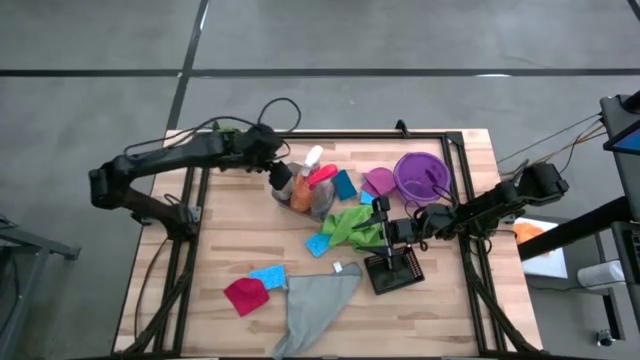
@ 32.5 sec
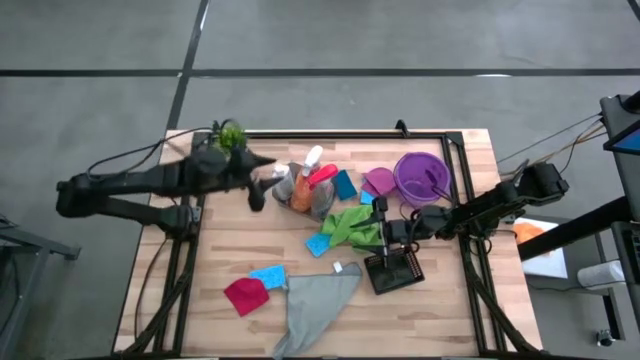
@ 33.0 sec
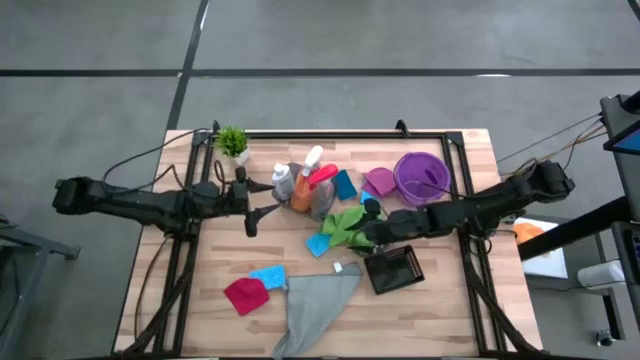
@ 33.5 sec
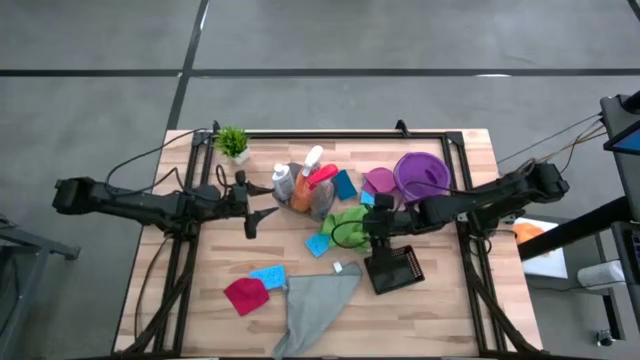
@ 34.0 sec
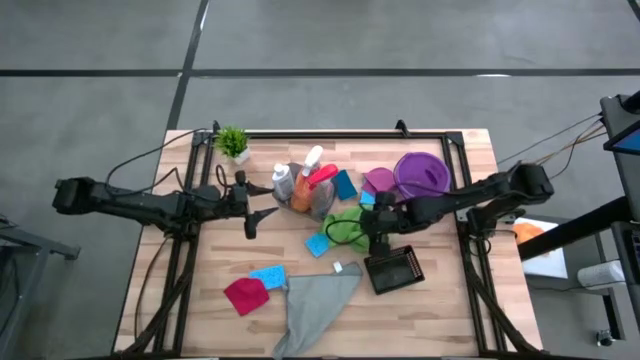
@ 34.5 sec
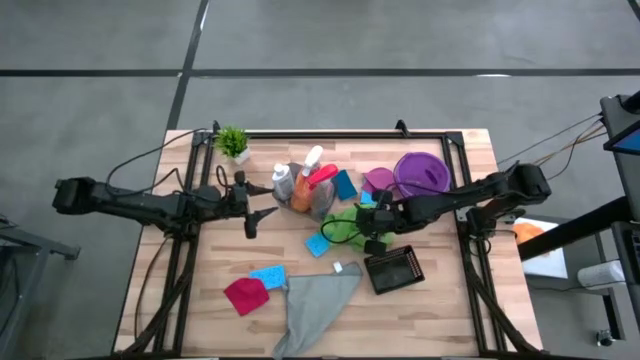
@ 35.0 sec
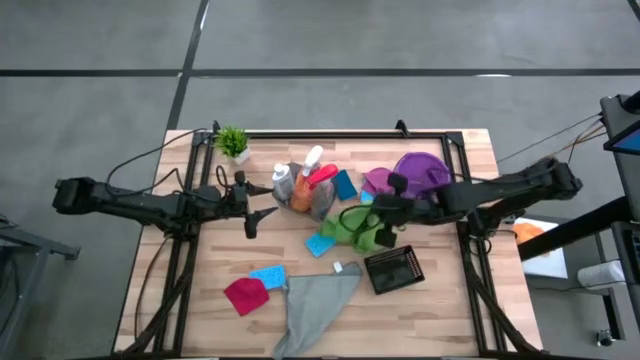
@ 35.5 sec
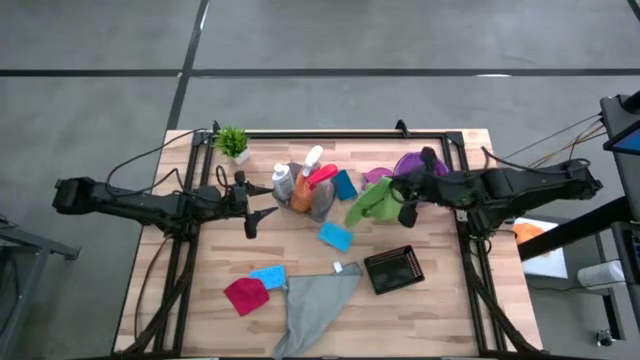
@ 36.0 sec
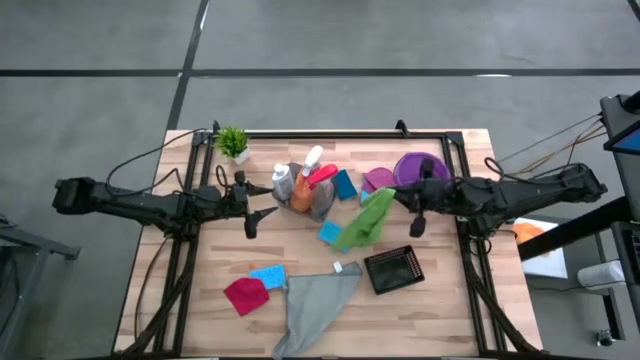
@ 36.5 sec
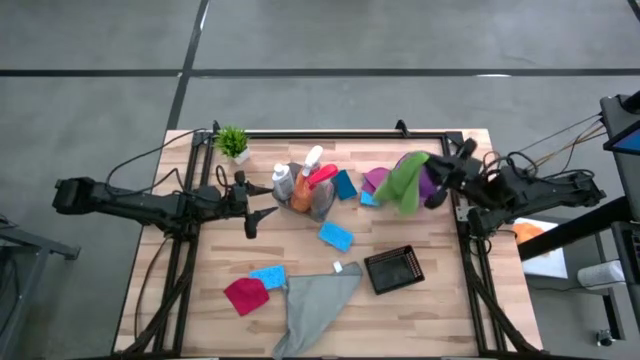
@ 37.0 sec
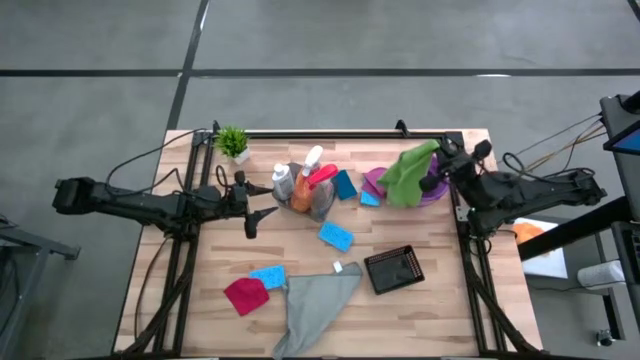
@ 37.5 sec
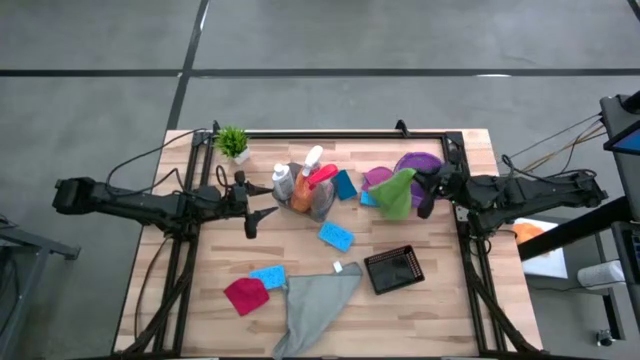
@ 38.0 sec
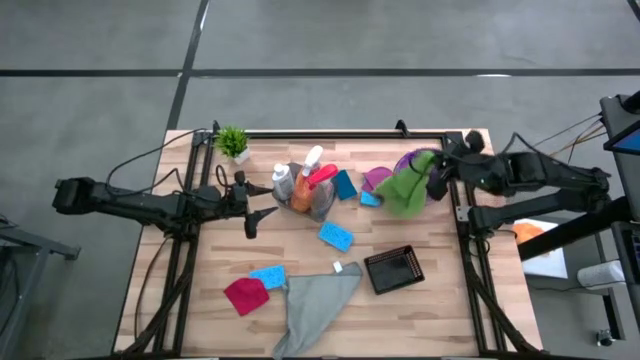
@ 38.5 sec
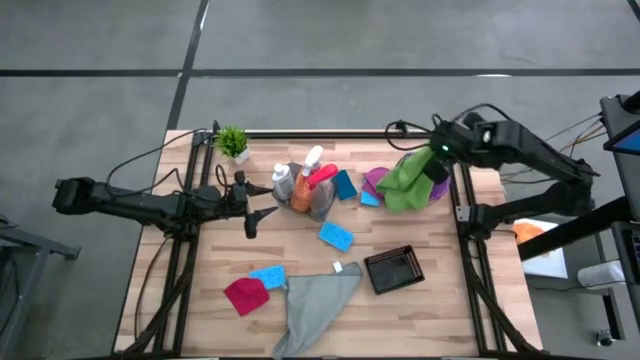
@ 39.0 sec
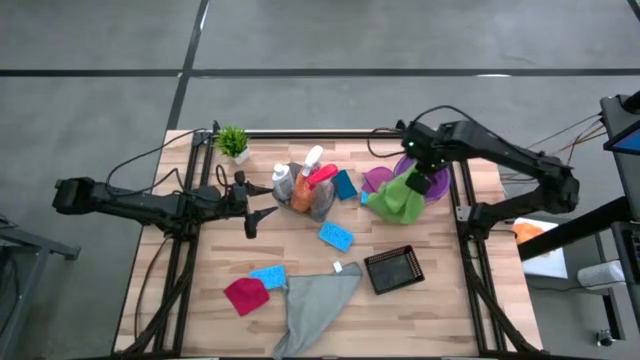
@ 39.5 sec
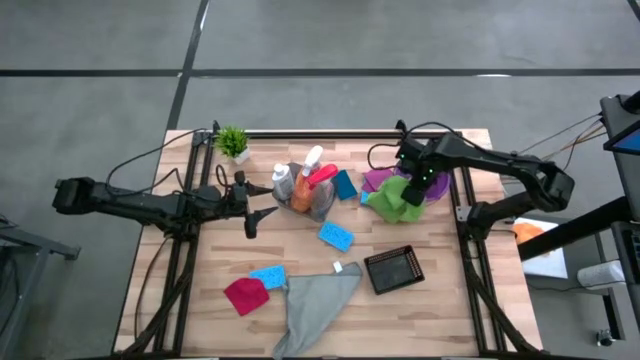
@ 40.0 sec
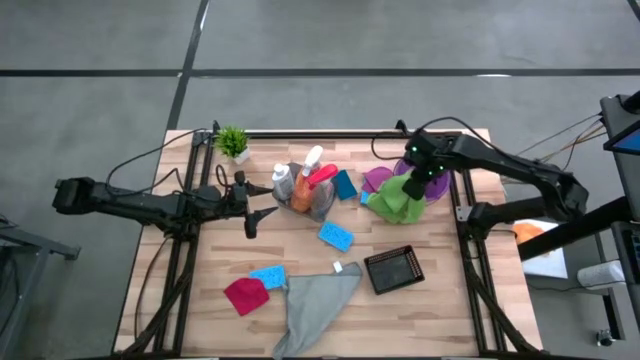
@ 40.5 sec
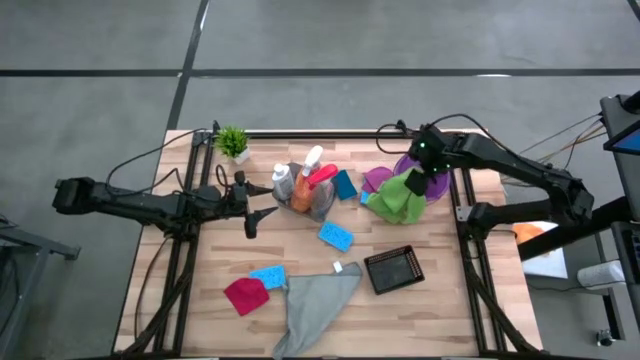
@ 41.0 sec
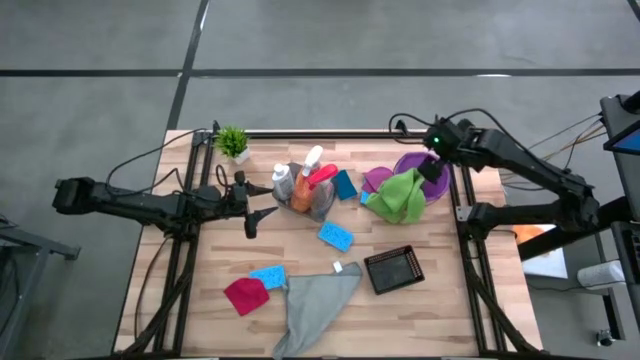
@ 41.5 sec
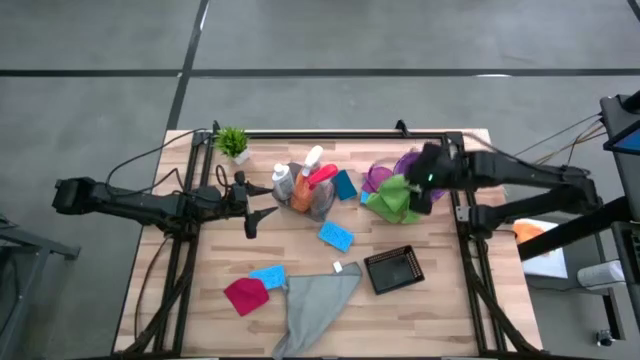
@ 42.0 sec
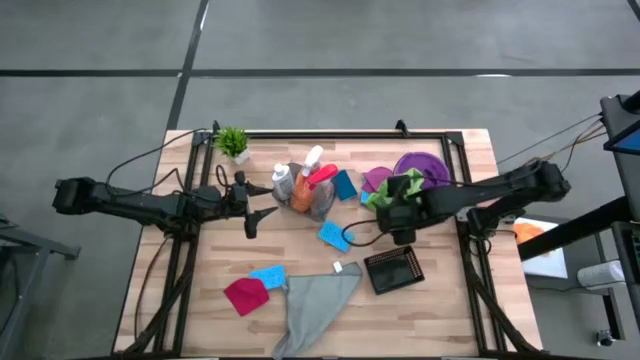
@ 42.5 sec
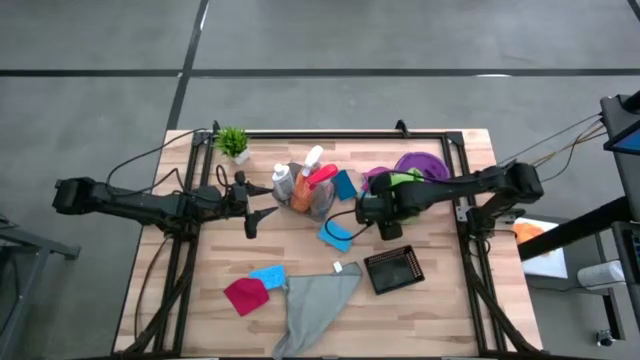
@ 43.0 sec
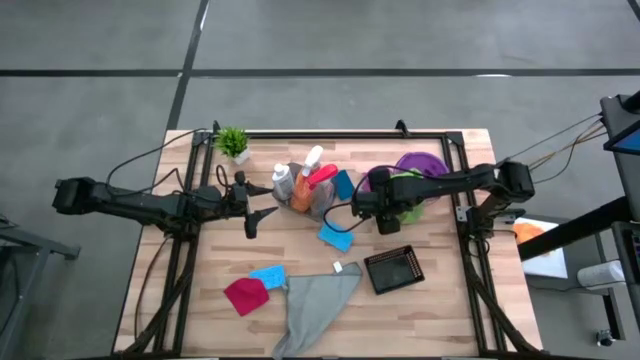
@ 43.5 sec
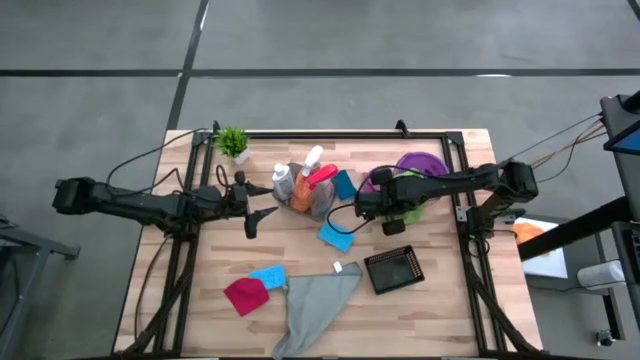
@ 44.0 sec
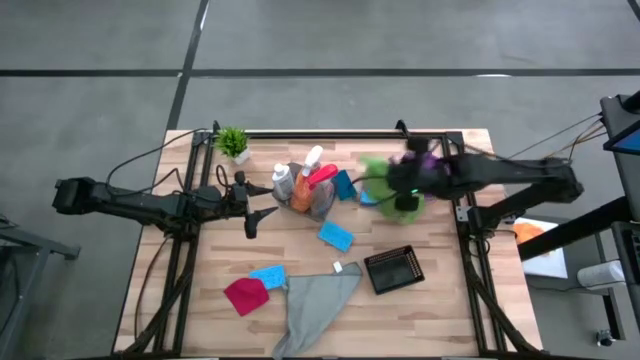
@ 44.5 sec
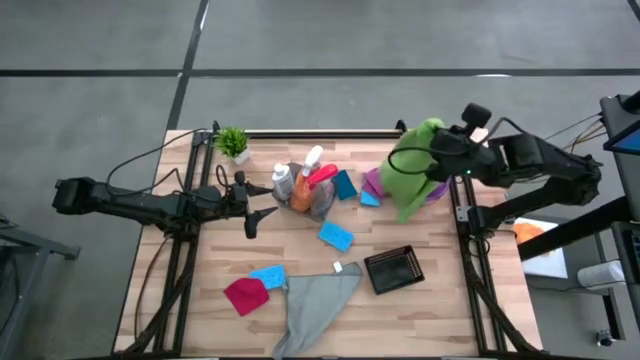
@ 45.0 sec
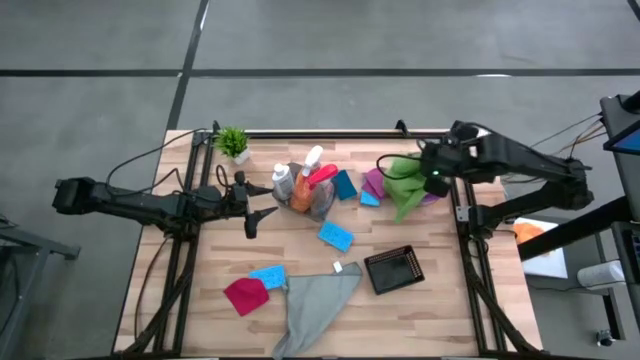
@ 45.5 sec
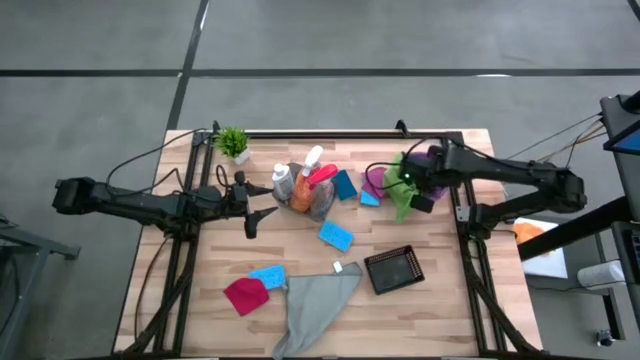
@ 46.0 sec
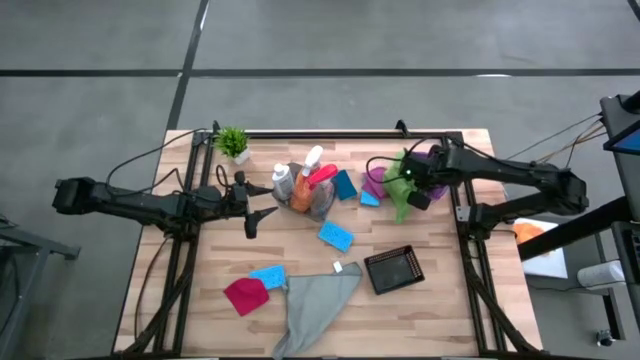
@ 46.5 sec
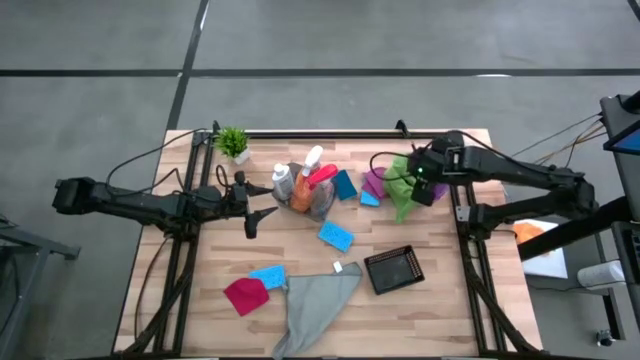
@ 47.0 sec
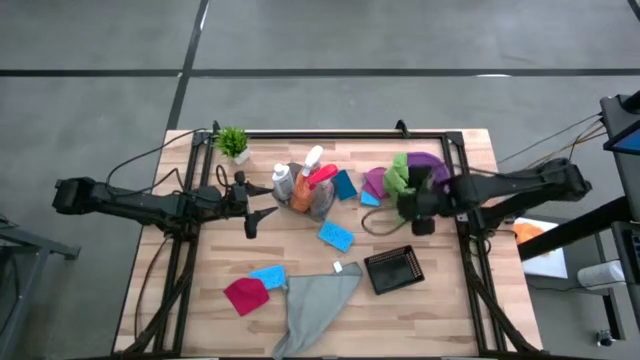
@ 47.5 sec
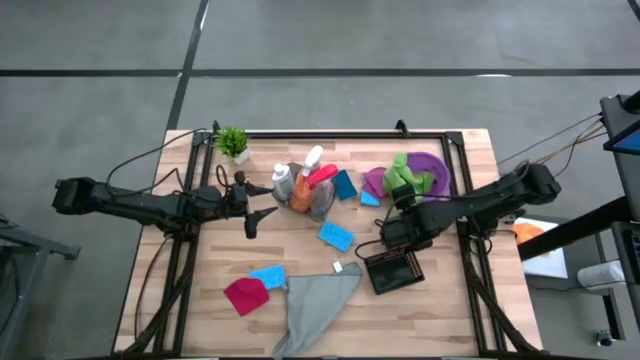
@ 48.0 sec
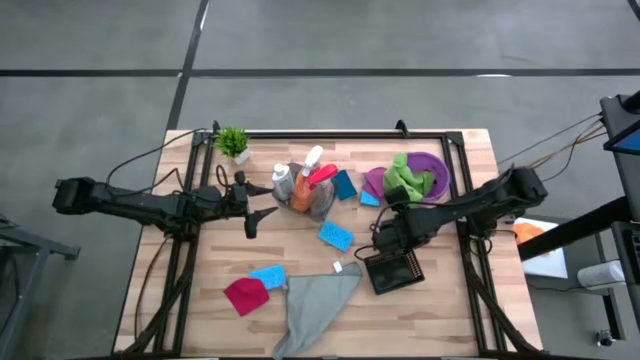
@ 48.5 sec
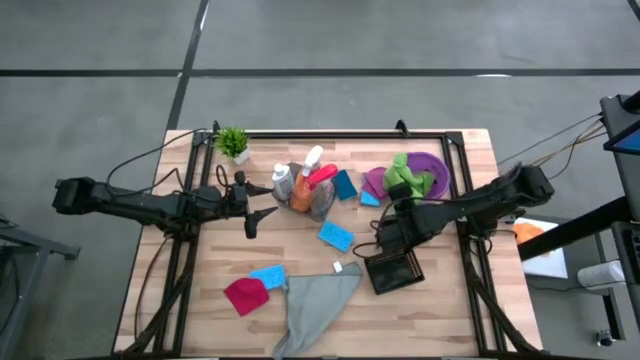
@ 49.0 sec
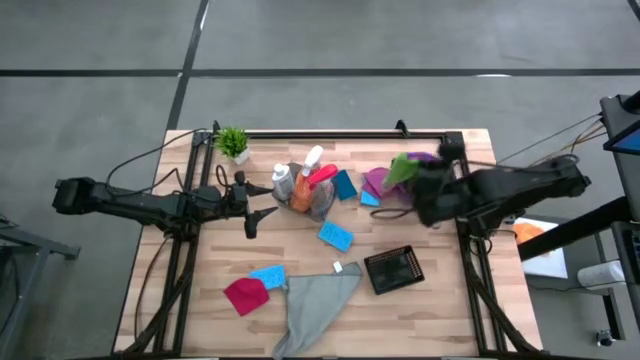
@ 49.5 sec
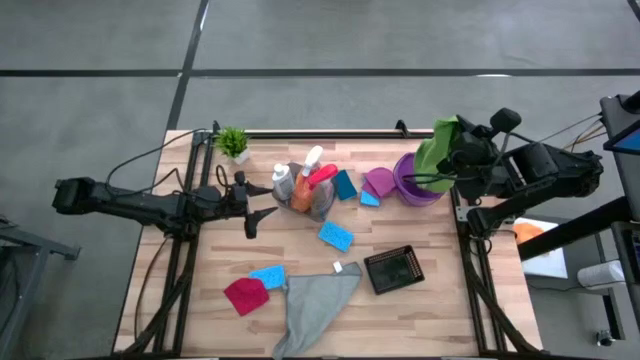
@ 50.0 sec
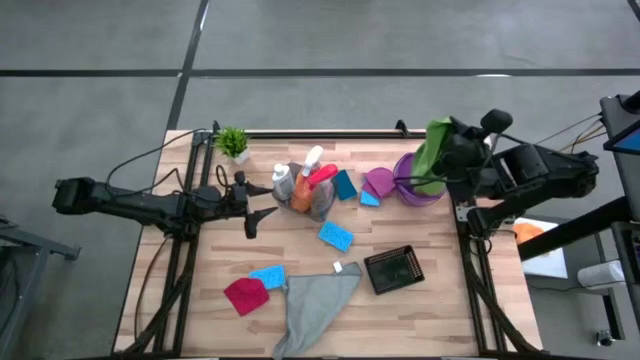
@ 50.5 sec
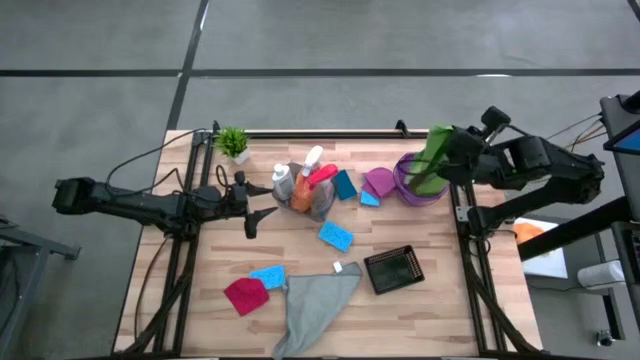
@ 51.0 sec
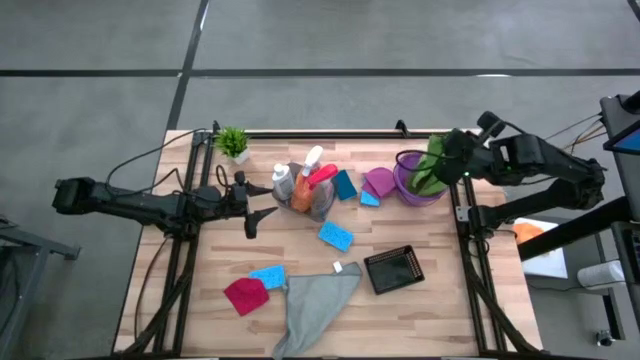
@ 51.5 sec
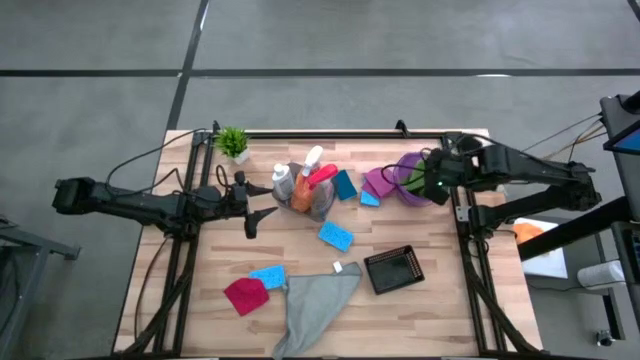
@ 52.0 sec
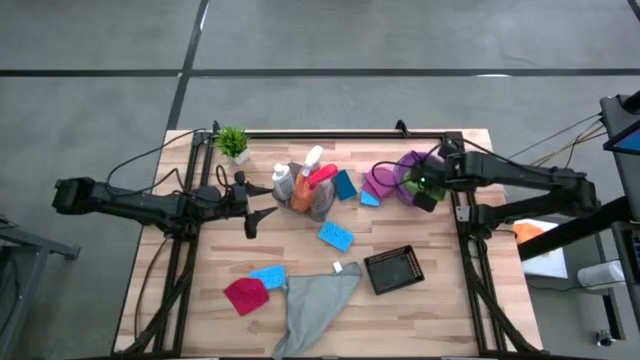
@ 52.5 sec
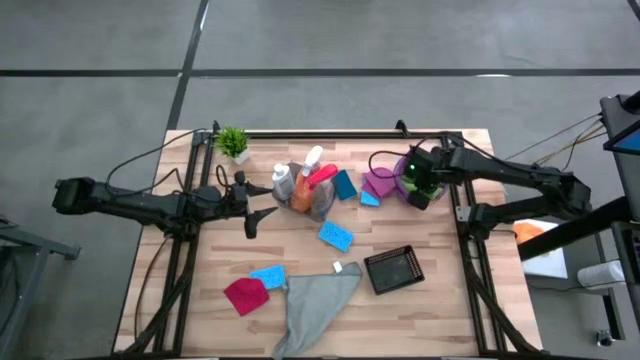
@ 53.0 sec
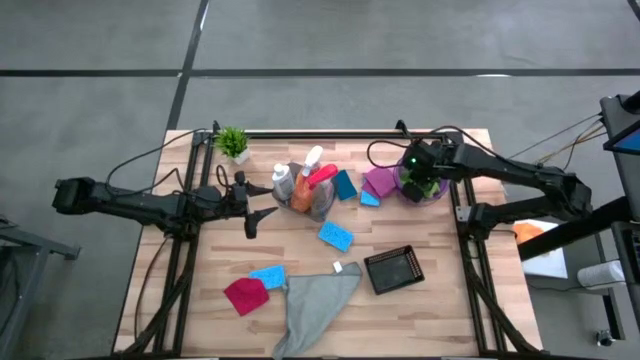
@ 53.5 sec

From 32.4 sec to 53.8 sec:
Task: Pick & Place Kitchen Items
Put the green microfiber towel into the purple bucket
